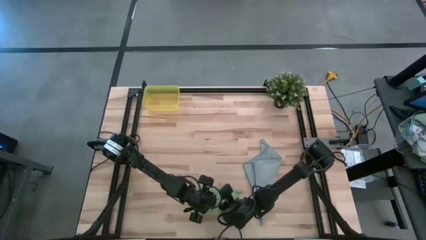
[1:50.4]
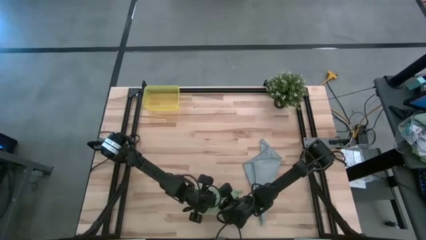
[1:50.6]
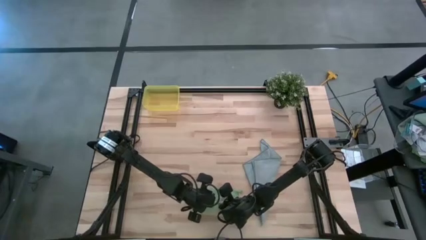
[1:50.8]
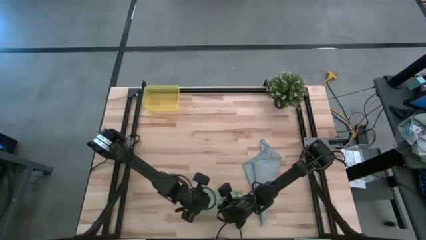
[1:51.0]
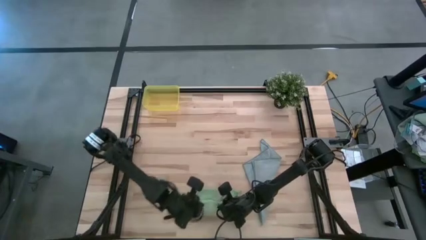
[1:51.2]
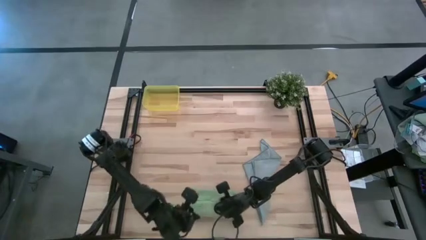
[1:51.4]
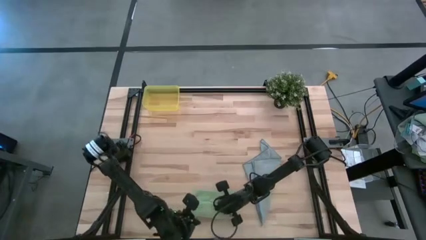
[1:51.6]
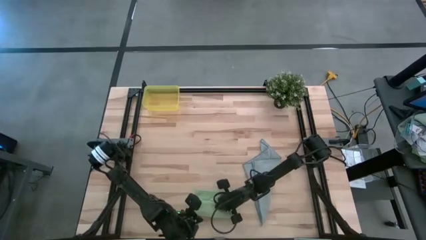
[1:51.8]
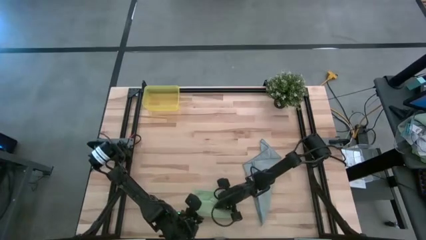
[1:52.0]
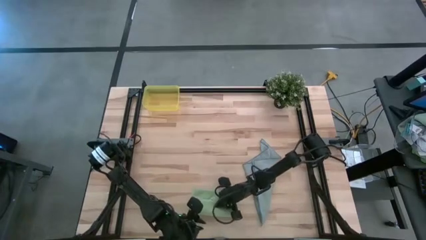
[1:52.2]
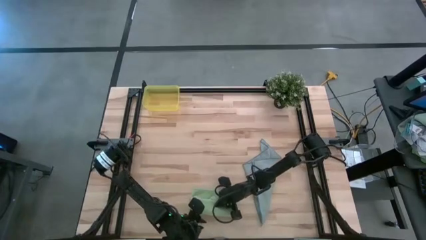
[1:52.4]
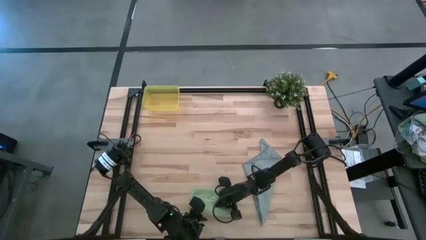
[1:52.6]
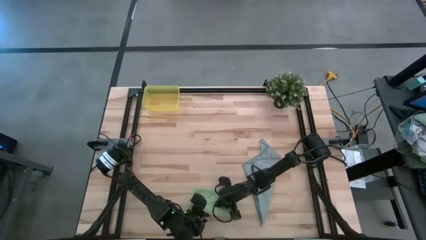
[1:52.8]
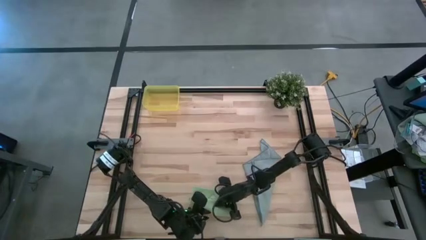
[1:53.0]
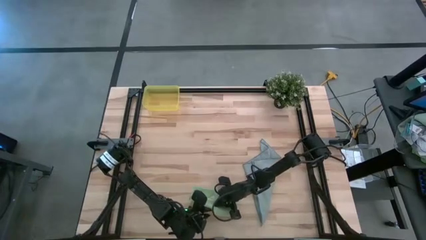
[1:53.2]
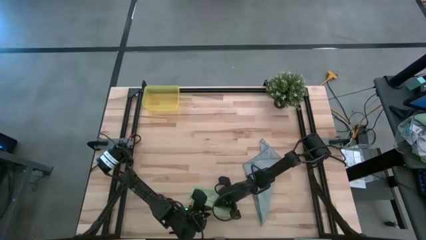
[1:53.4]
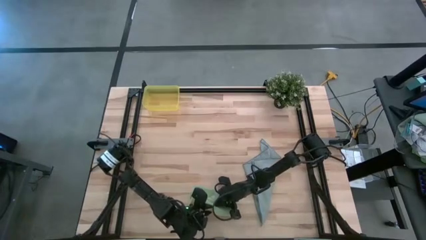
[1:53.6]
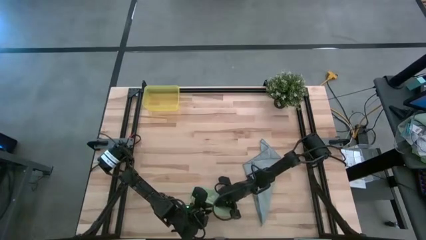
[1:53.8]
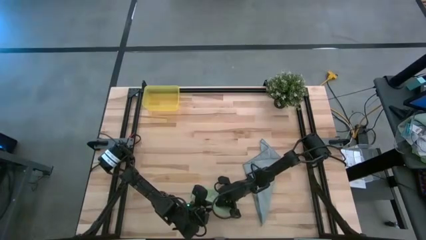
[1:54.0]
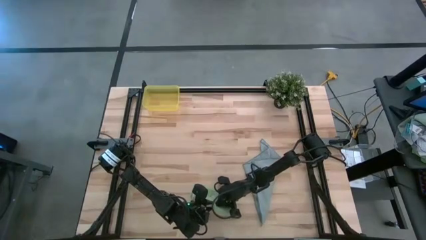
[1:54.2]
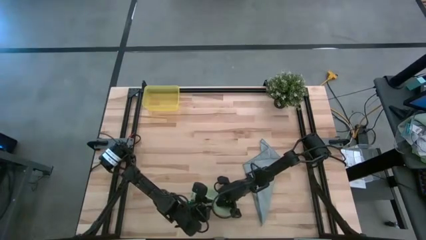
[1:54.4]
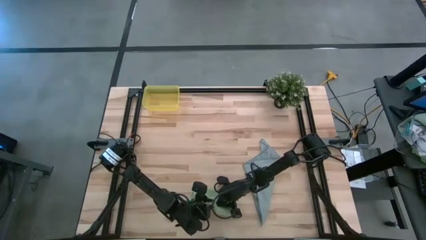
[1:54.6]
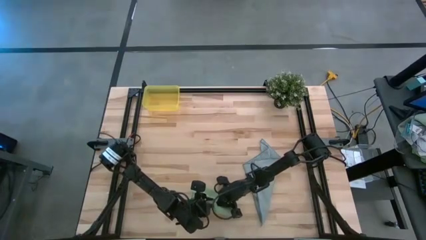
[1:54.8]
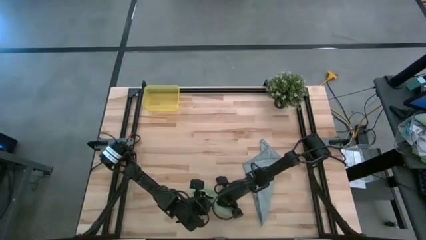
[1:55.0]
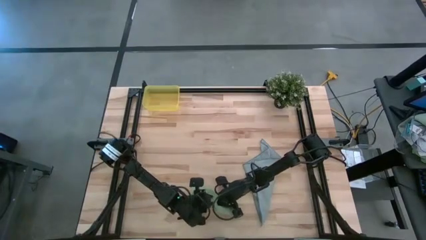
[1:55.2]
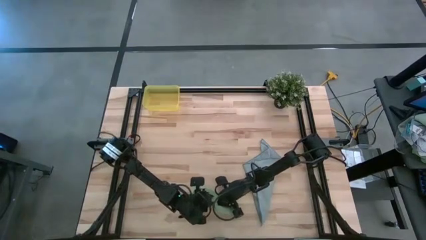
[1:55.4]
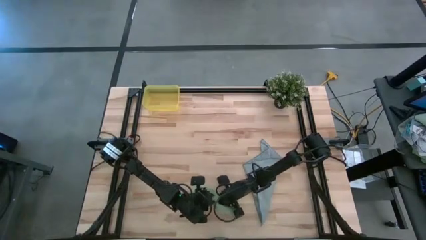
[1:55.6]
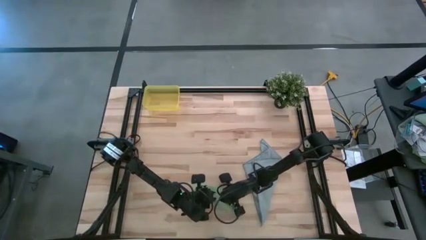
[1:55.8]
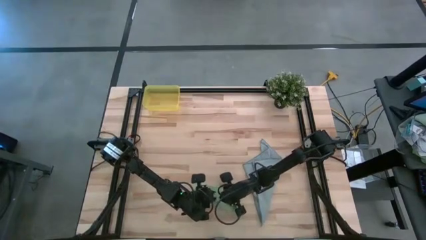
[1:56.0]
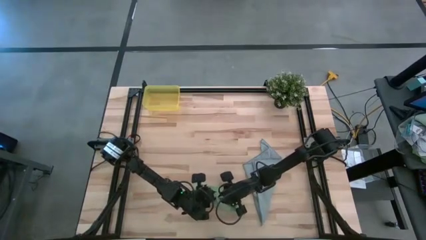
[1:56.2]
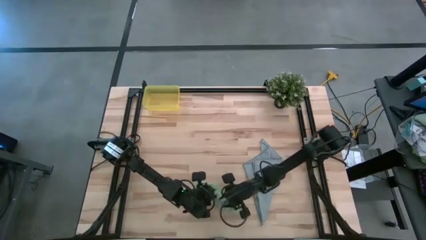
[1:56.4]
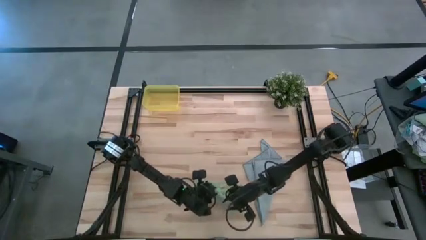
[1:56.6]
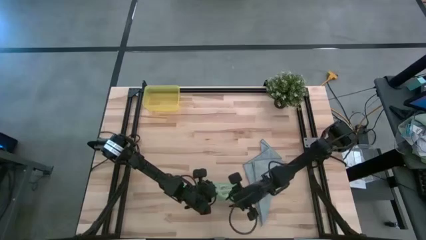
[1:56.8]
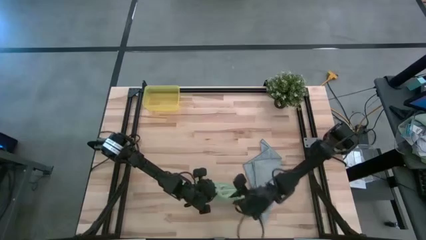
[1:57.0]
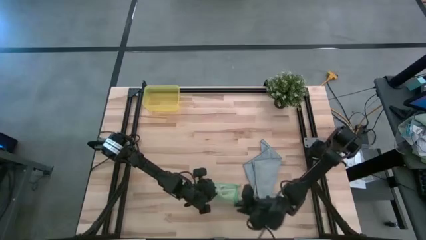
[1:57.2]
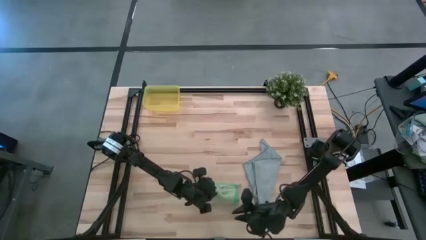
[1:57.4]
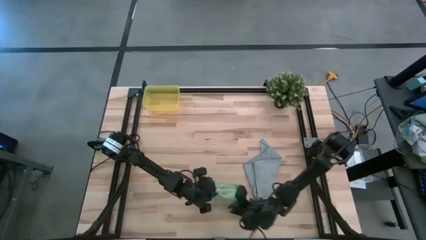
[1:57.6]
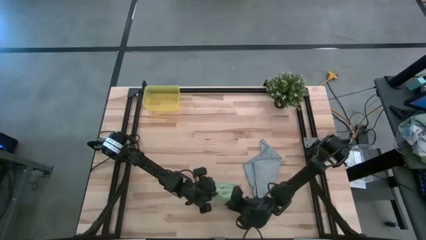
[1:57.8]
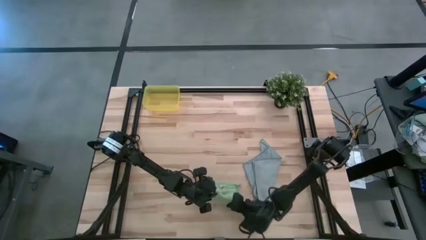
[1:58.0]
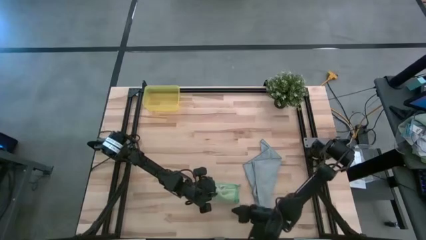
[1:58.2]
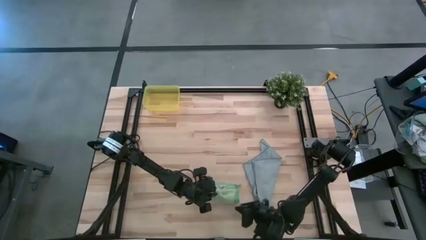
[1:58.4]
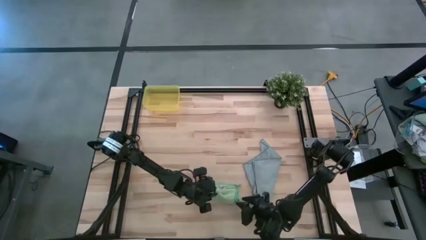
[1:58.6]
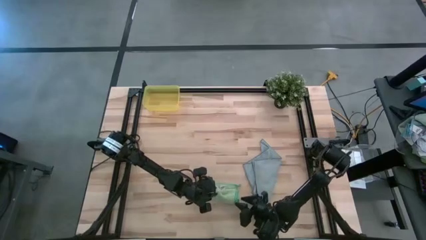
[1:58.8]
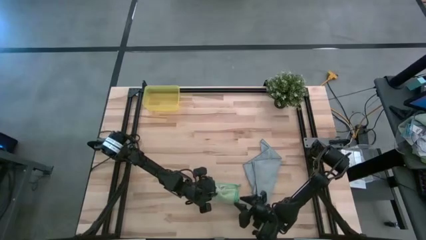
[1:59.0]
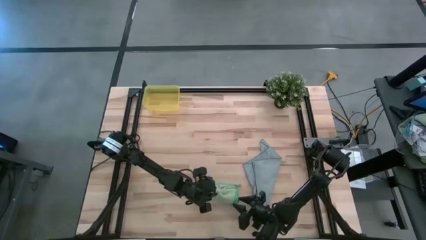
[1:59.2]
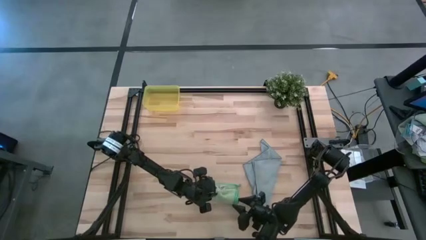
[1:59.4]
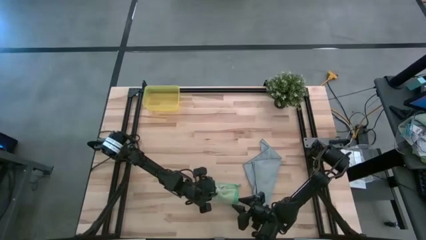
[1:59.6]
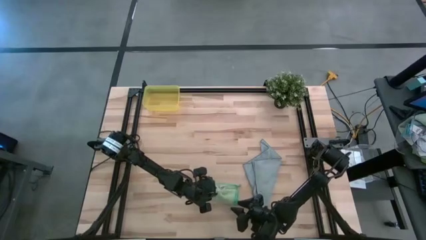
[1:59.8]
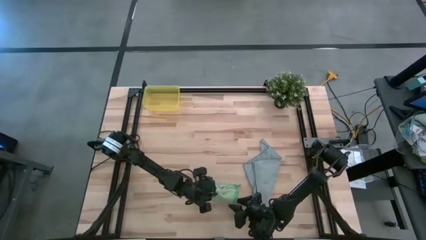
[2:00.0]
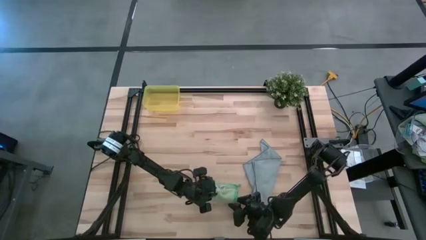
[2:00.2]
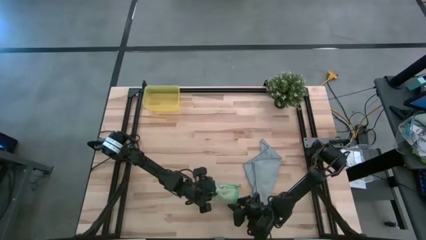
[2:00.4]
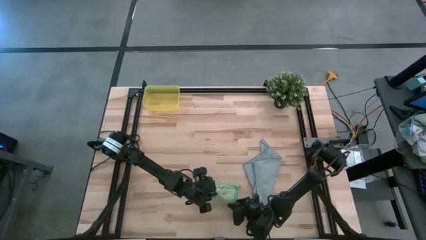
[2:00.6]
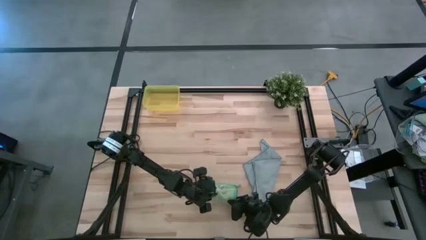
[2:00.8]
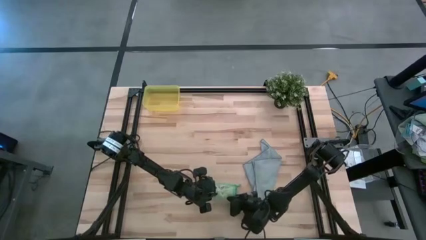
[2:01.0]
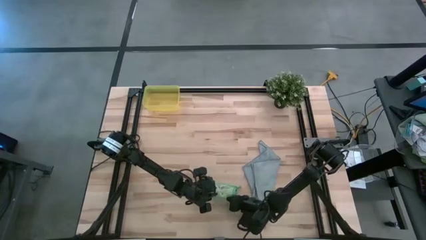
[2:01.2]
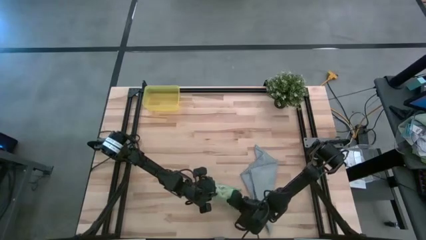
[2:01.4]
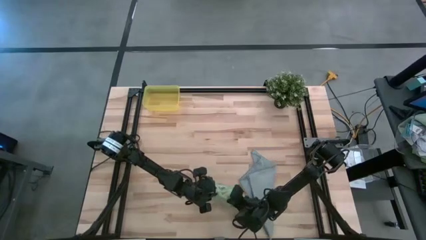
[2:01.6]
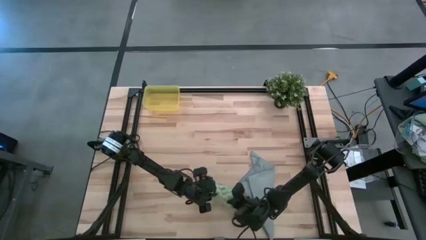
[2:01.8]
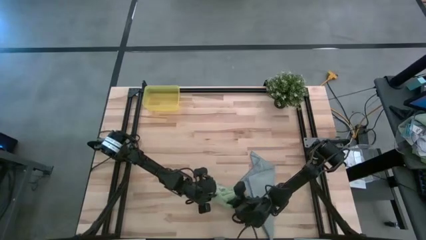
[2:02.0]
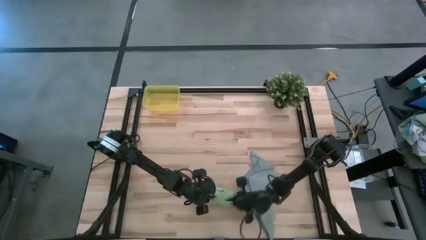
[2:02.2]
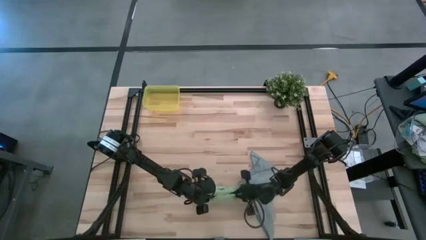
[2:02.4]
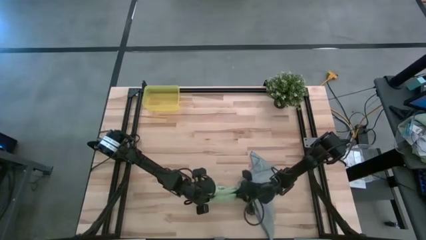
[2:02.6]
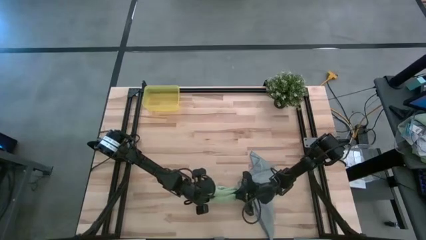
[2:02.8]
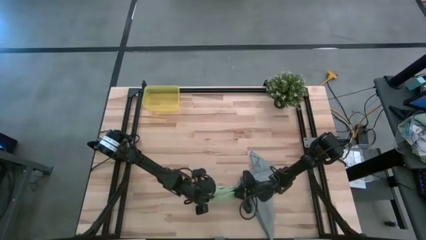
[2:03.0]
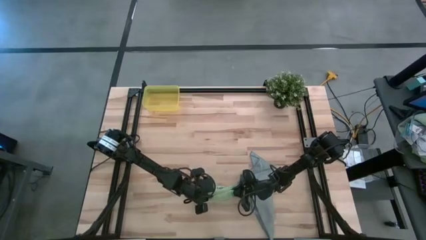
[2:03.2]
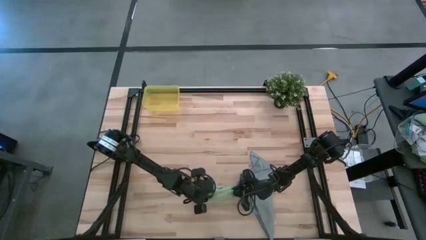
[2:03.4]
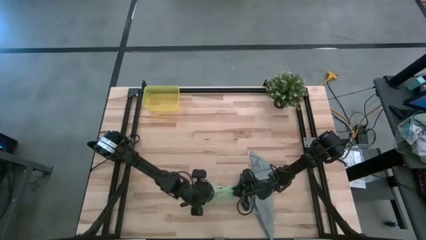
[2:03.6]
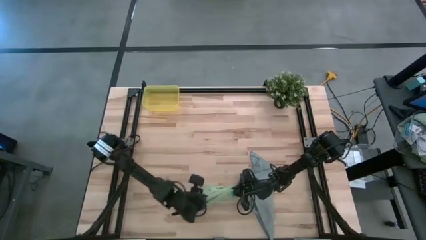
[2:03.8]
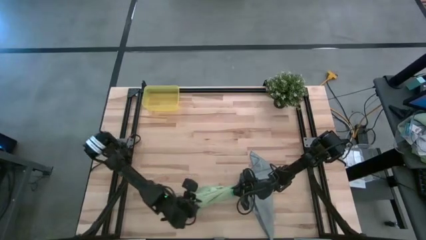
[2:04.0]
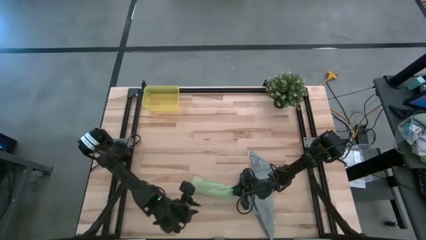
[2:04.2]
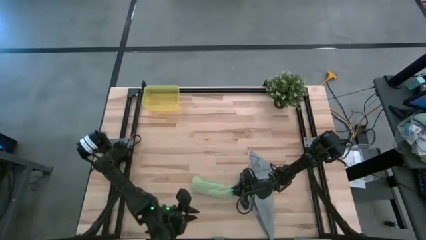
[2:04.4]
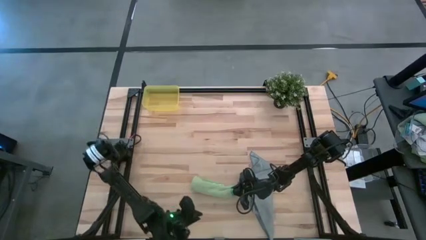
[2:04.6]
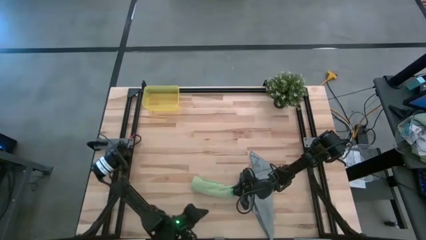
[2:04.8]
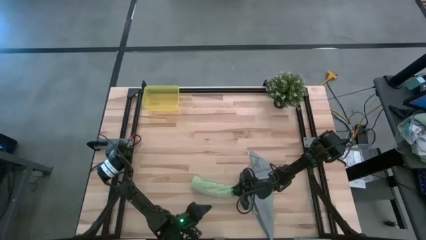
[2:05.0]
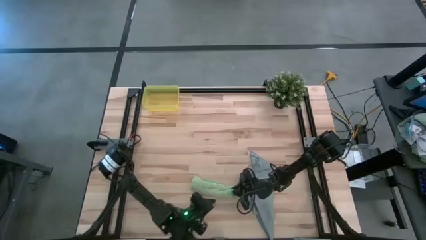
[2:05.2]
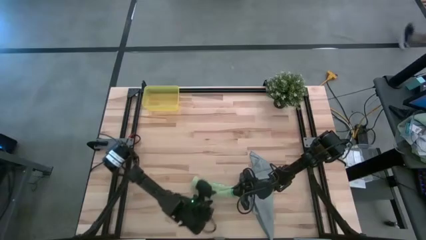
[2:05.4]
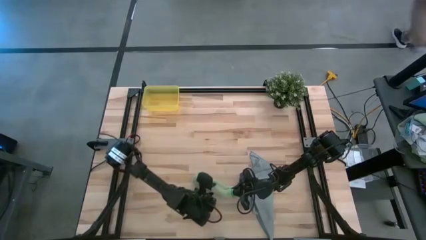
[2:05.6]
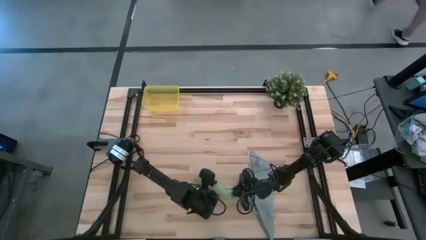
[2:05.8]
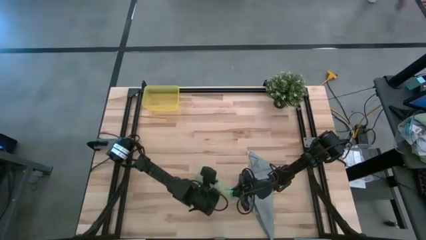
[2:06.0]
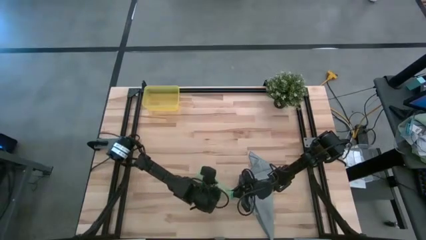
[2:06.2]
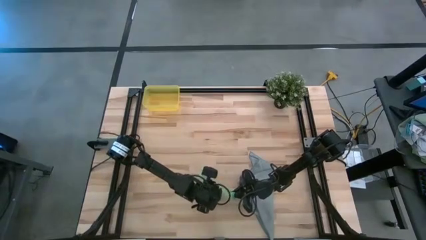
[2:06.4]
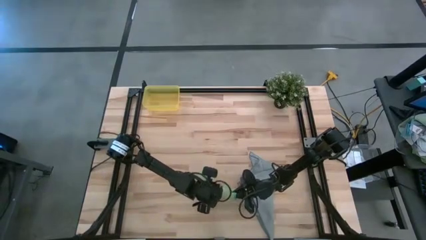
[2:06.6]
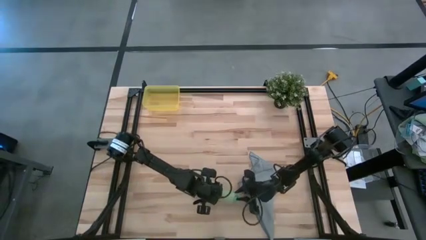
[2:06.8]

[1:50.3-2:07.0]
Task: Roll microfiber towels into tight, uniform cylinder then place into a basket
Roll the green towel
